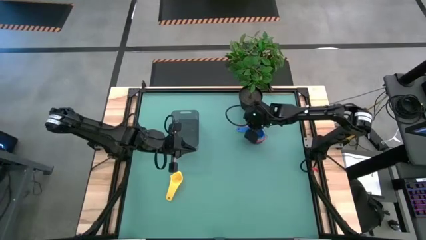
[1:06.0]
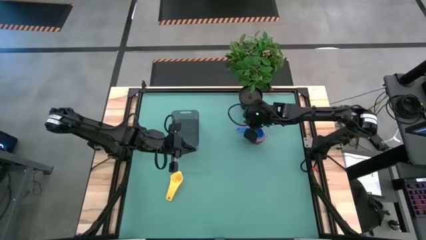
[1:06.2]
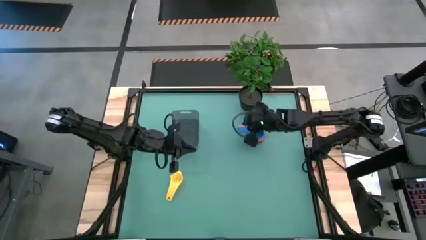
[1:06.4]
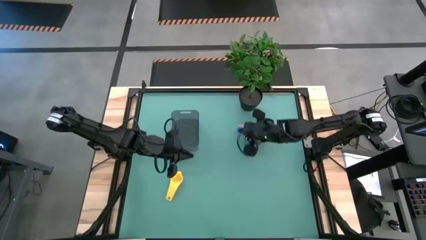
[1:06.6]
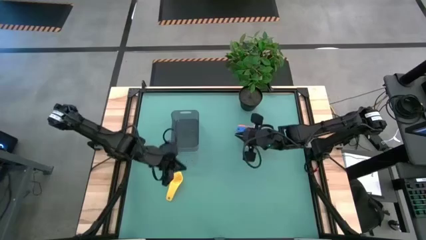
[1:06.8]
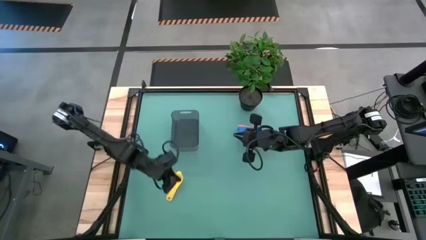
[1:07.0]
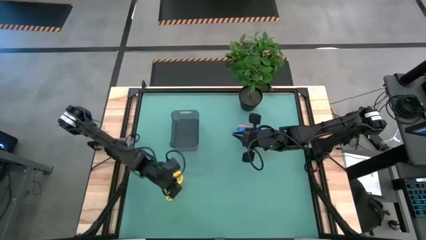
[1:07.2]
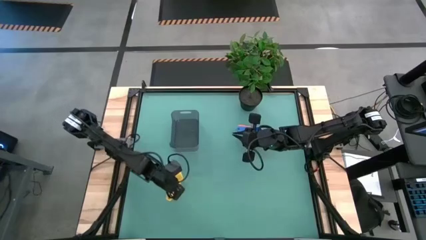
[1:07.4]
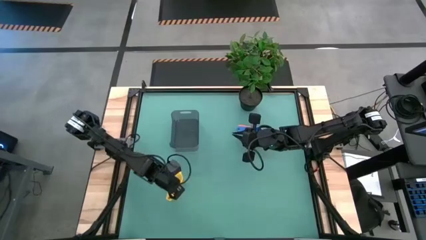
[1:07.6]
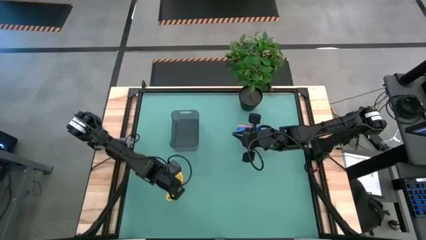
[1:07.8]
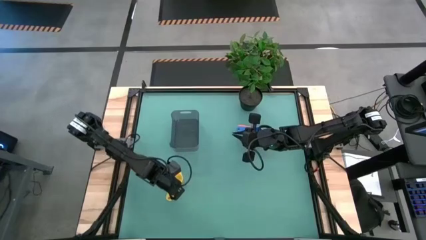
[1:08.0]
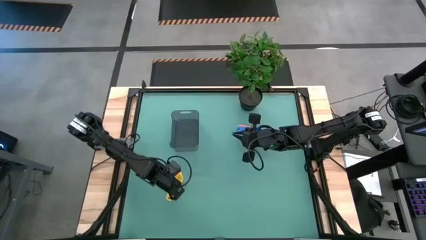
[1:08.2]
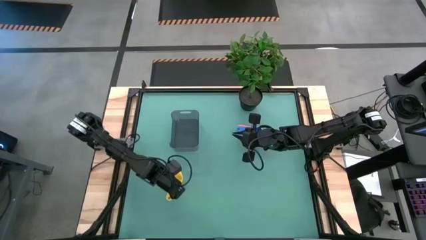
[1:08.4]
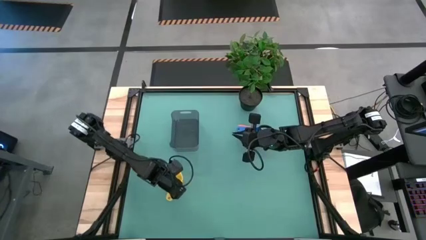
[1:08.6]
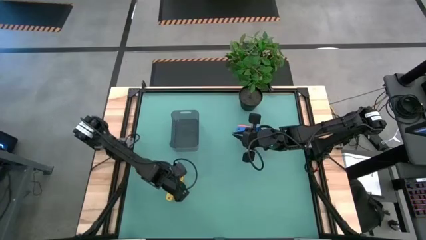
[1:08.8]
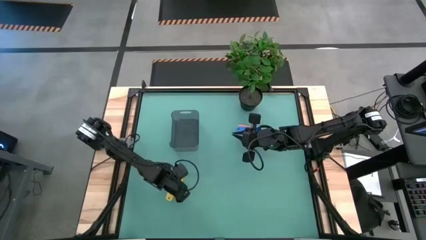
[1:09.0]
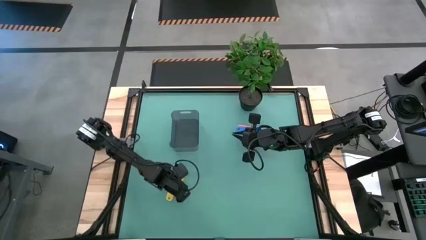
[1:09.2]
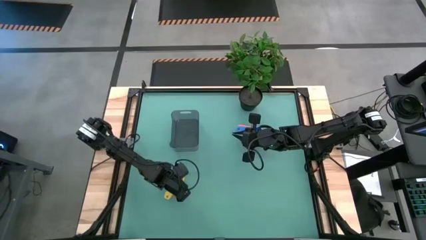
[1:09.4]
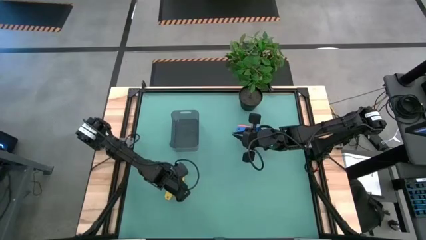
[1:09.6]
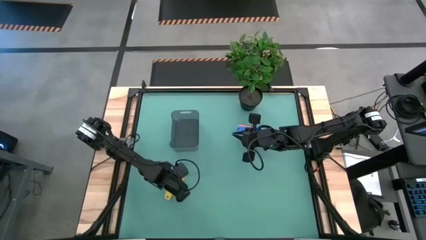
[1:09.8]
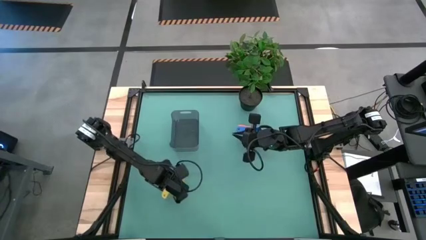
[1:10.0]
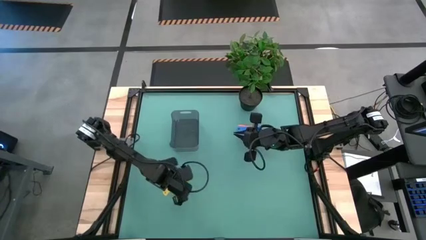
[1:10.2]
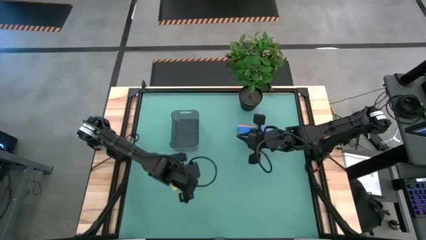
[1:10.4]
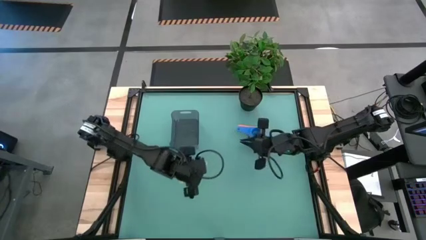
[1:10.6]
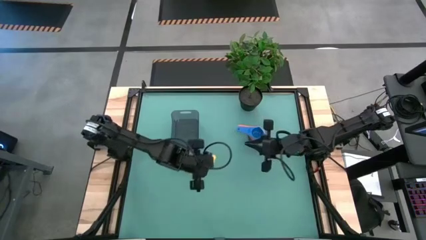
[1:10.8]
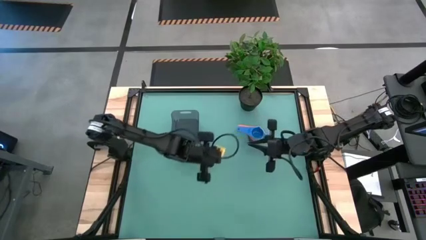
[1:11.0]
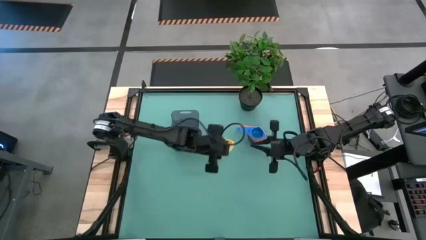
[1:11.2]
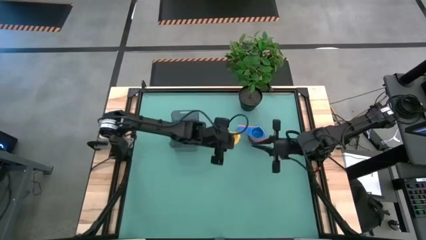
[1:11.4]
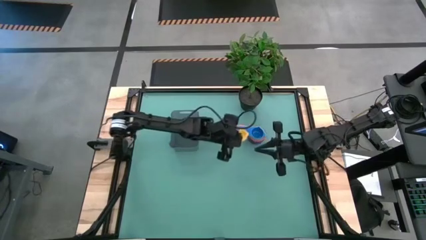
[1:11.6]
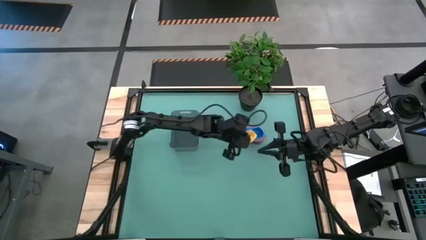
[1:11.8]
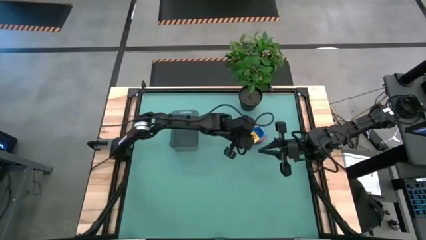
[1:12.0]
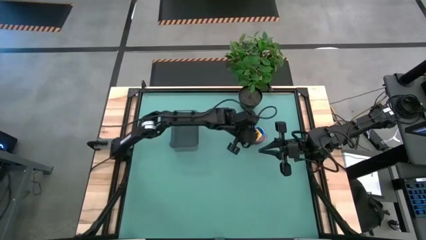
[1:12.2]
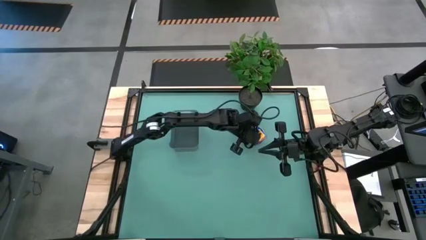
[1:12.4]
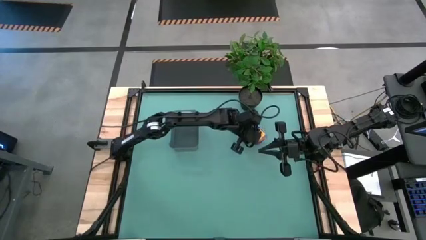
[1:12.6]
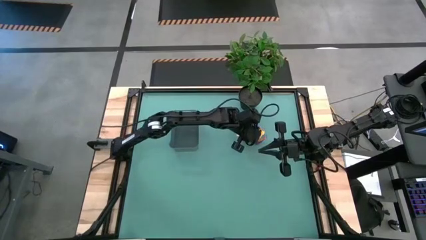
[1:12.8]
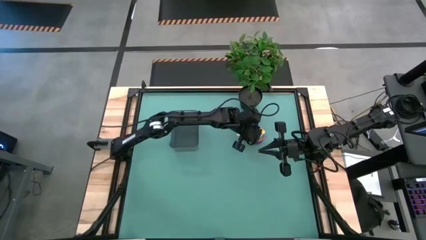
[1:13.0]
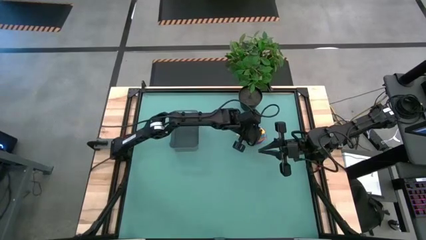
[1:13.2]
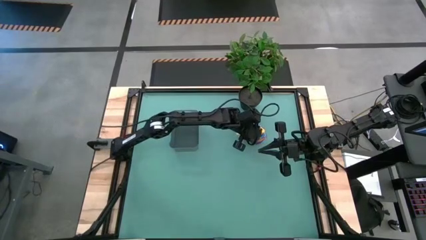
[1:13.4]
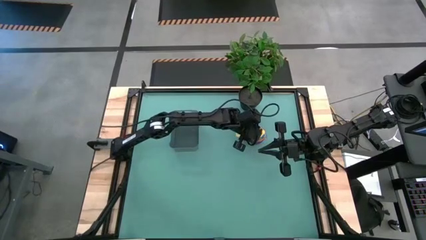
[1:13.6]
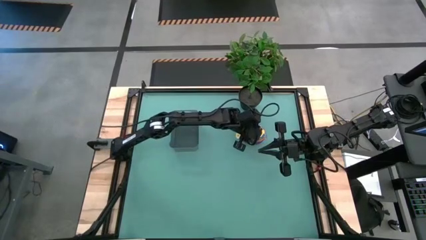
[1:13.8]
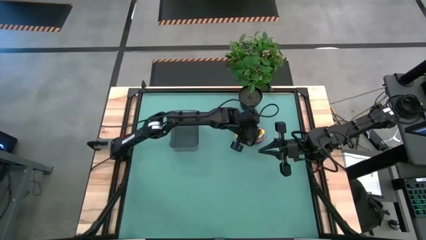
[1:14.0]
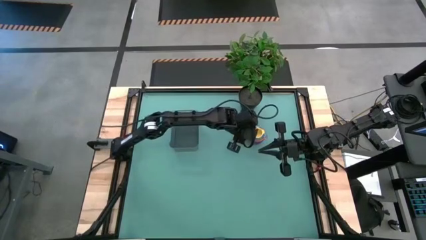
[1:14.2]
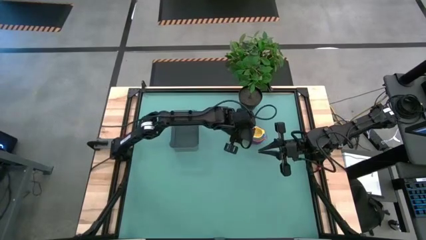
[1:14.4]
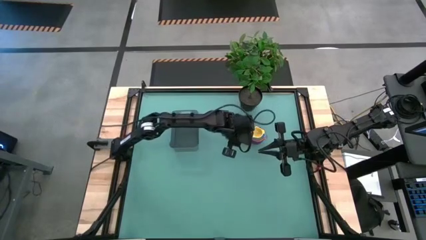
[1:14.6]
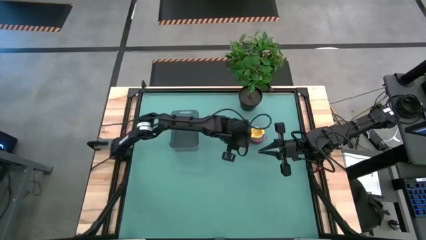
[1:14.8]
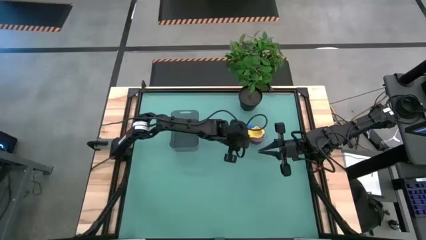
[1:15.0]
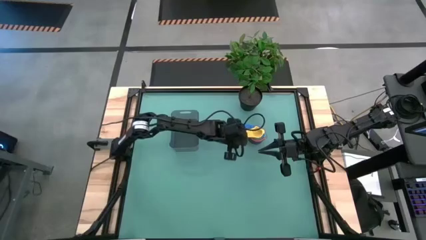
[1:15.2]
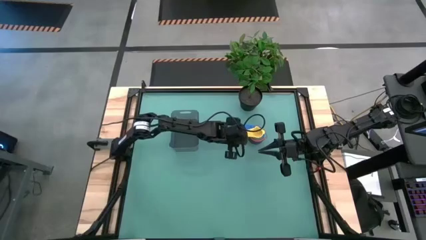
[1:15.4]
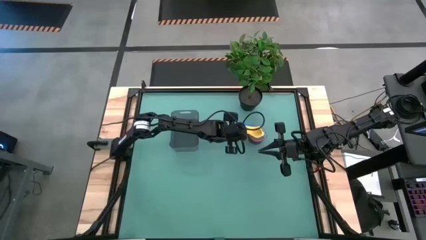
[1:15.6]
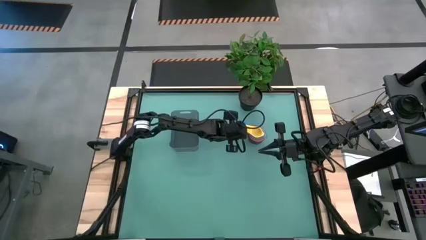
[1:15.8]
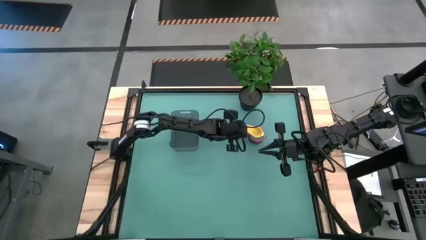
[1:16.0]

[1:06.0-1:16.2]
Task: Nest measuring cups in basket
Stack the yellow measuring cup on top of the blue measuring cup
